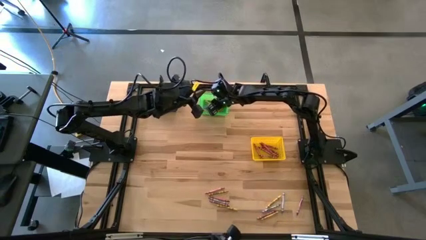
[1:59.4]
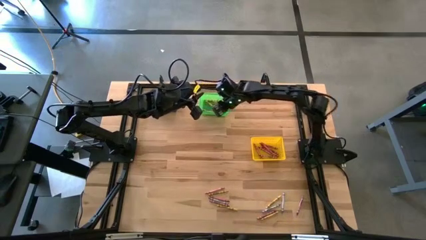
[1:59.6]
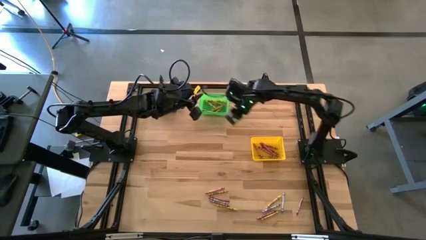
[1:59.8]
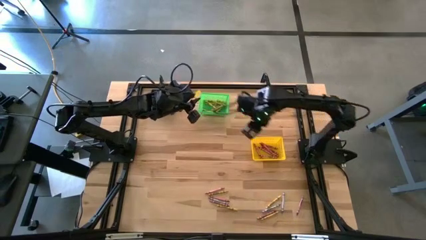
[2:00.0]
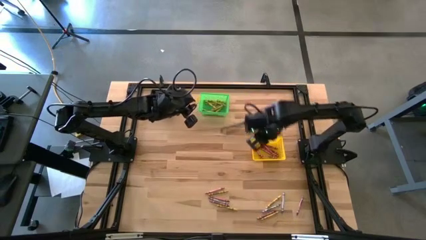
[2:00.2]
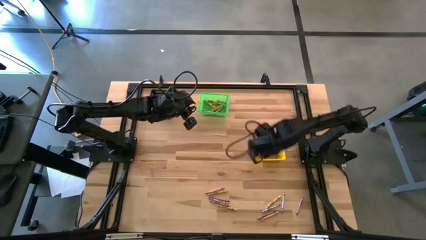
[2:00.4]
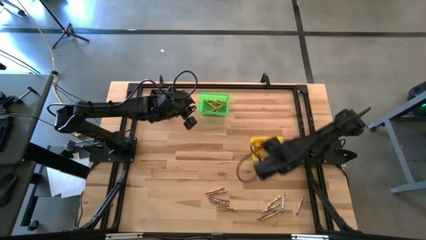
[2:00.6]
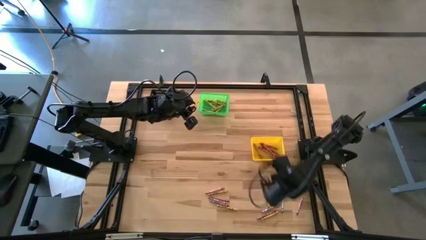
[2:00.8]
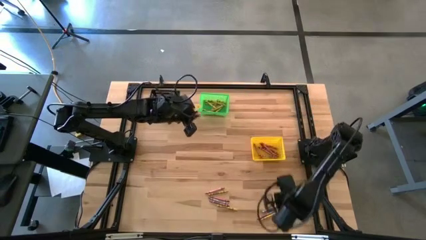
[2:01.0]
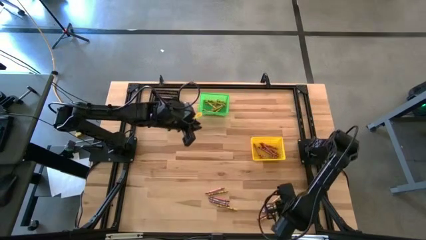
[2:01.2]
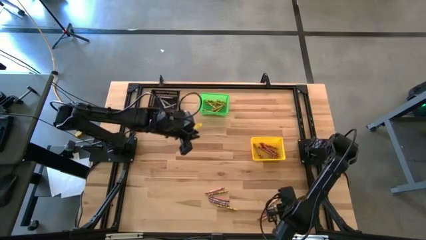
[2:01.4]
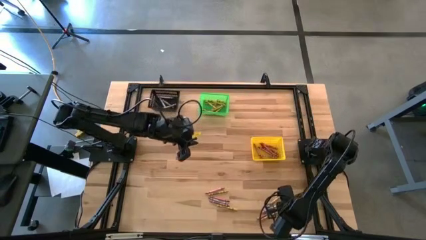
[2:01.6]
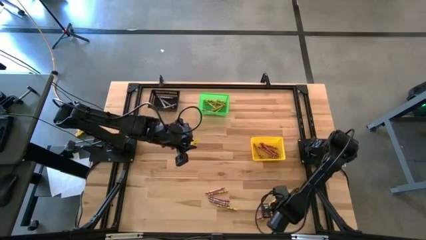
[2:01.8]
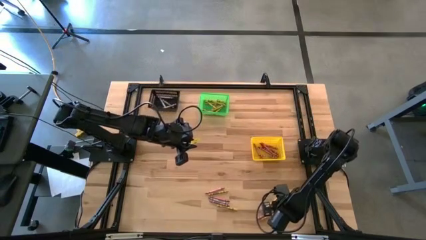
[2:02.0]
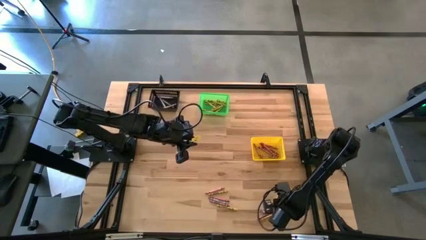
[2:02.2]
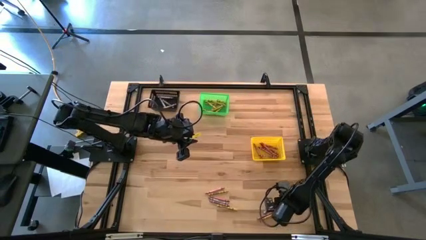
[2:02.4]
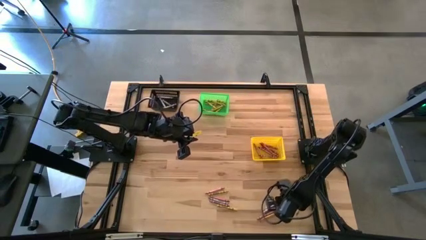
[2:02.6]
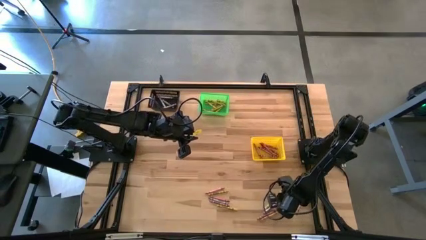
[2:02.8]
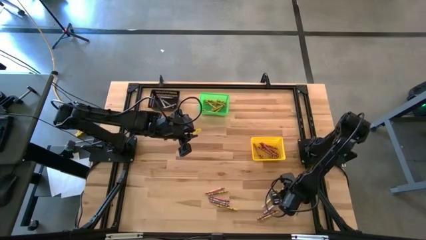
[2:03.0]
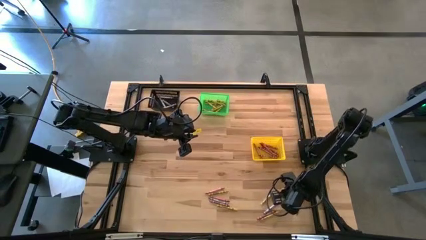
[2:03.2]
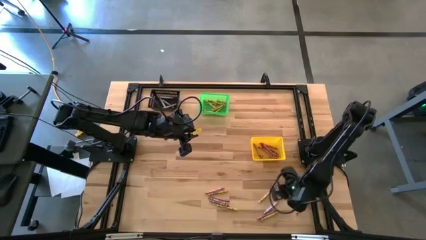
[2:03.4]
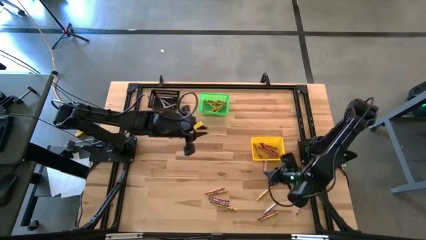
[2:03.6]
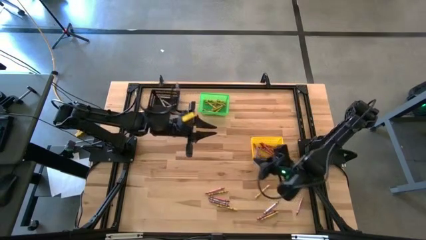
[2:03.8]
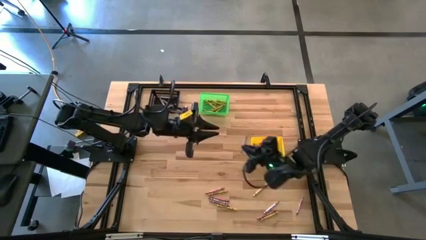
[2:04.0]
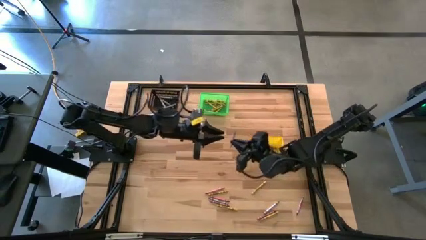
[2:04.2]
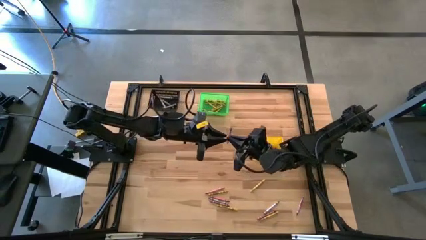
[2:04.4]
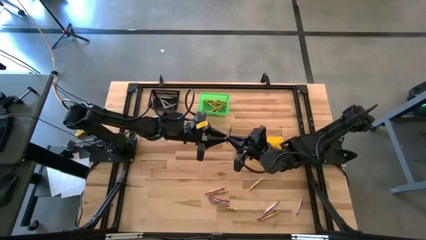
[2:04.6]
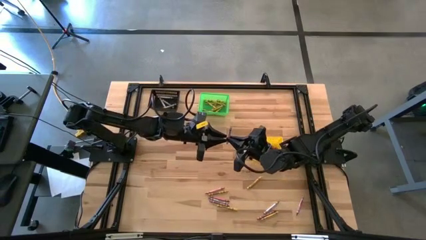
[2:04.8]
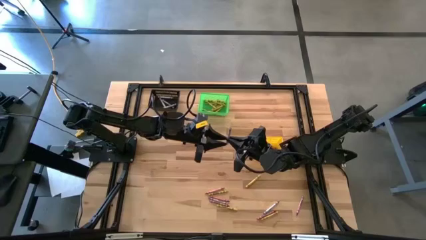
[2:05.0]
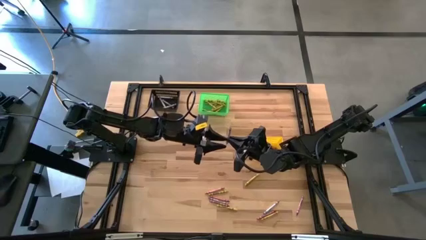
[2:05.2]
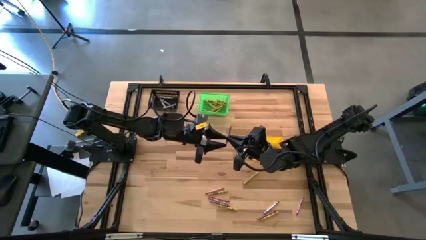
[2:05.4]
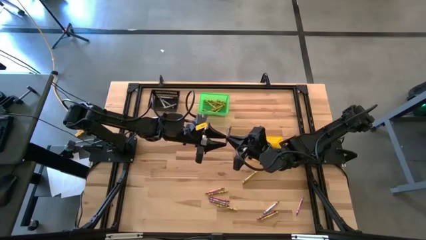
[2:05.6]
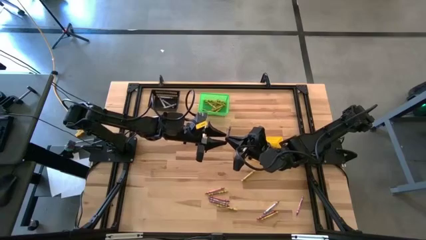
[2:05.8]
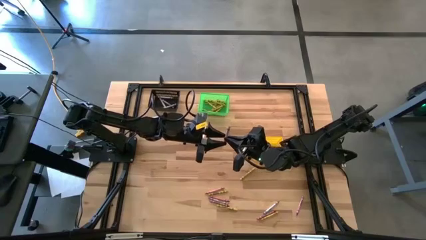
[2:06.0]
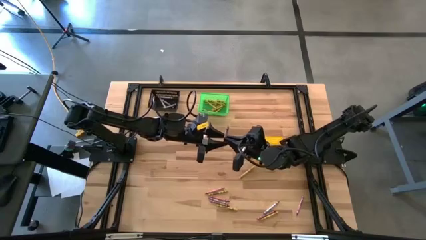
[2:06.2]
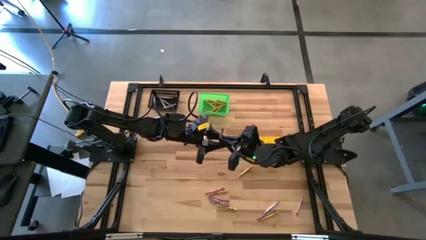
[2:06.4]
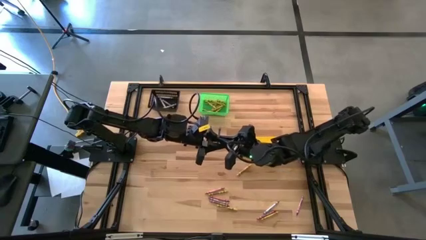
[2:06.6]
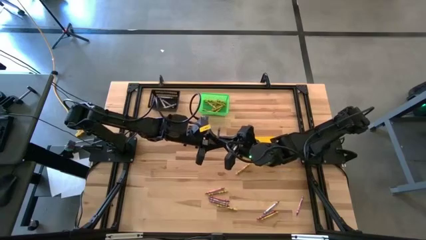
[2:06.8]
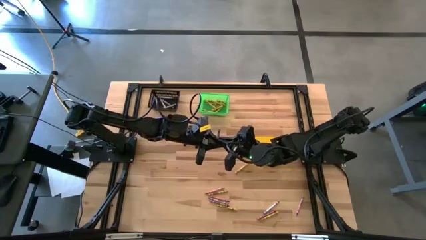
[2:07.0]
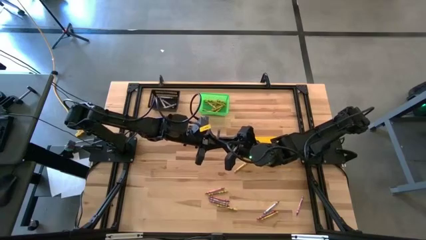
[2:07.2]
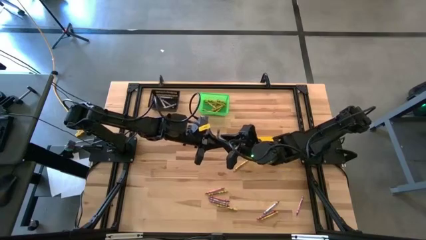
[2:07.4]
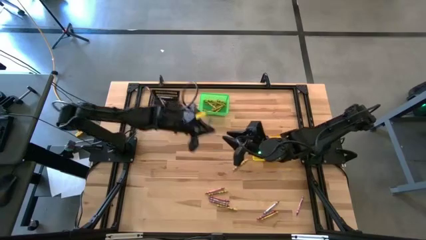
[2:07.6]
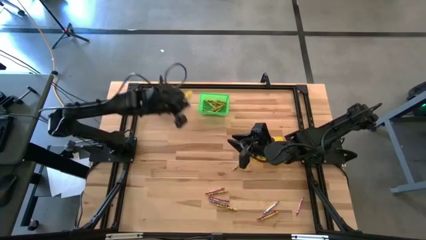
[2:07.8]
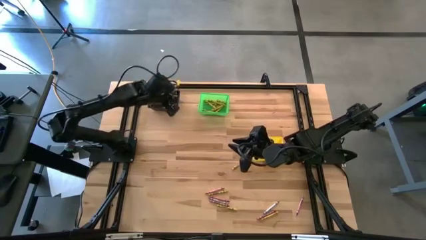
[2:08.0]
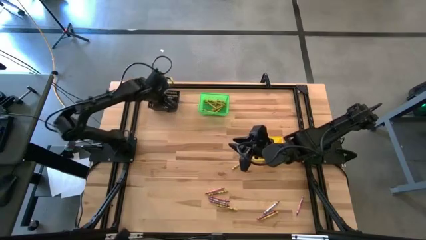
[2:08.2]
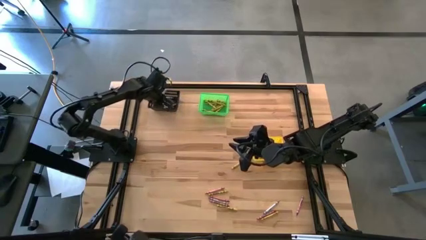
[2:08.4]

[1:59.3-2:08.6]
Task: Sort crayons
Put the gray crayon into the black basket

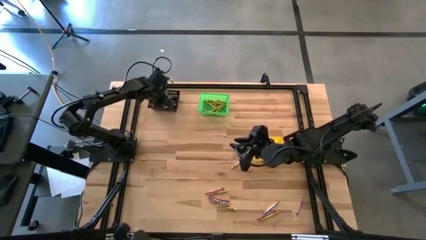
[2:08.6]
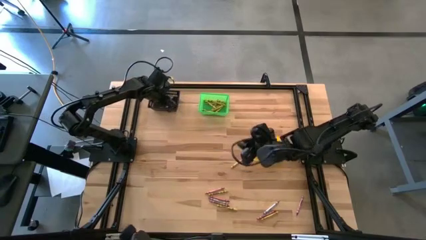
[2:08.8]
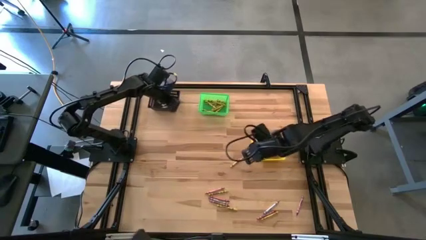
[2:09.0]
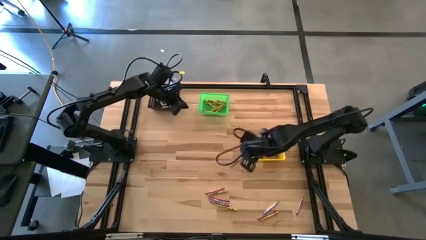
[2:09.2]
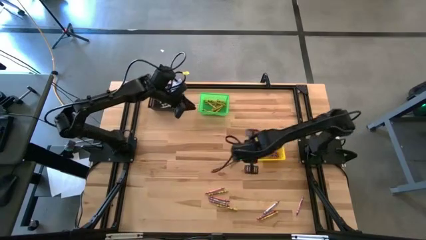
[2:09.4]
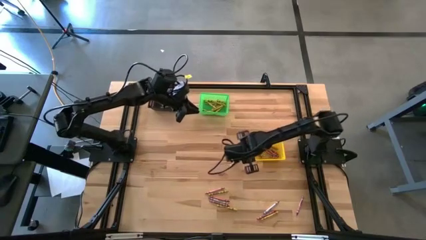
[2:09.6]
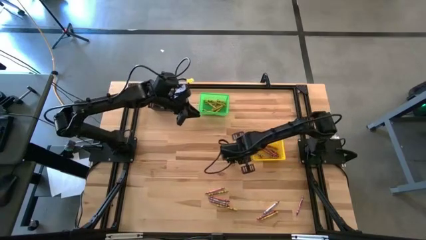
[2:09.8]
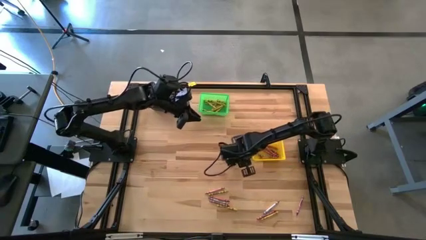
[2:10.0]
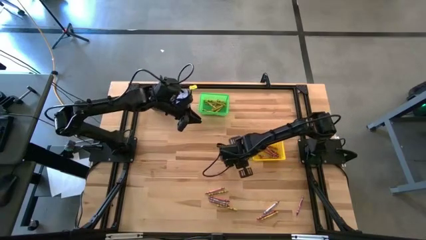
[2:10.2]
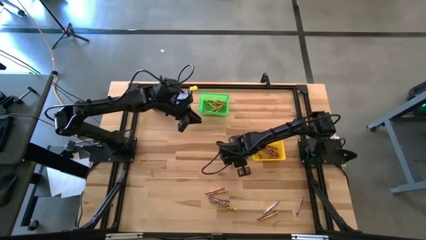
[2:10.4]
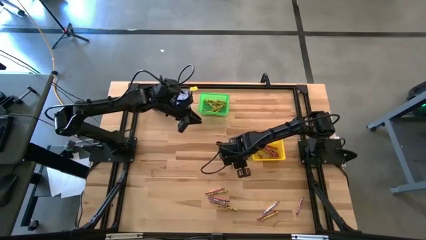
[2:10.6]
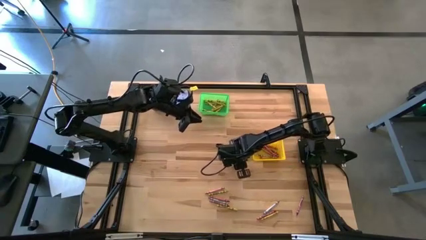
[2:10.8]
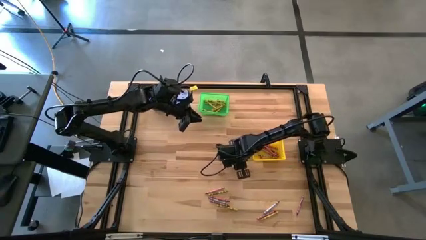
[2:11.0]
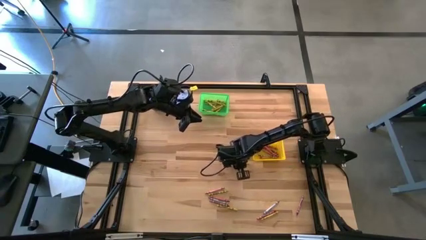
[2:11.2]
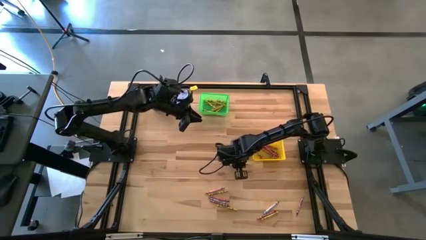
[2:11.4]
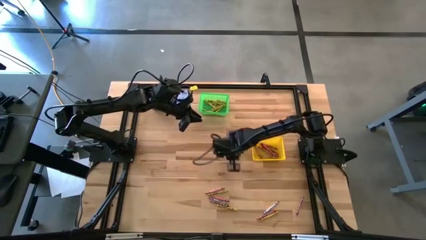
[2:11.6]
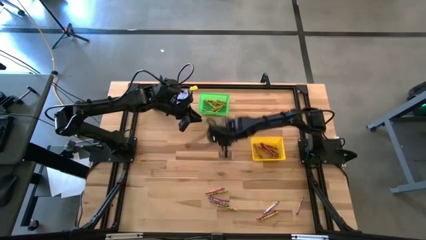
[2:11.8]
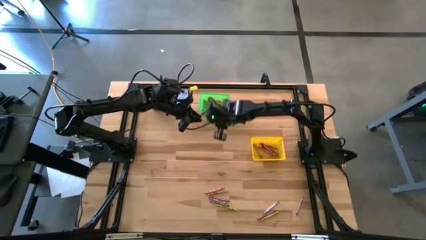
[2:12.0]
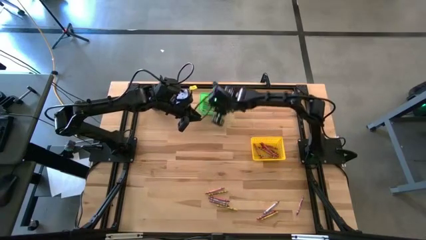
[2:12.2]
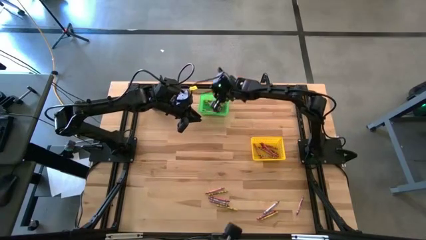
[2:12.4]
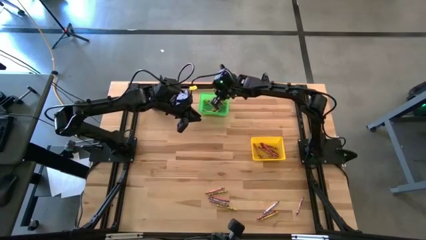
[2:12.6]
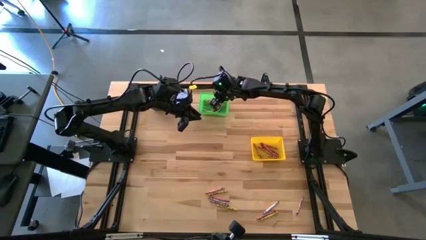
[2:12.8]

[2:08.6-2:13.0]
Put the yellow crayon into the green basket

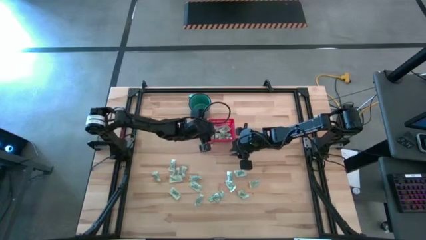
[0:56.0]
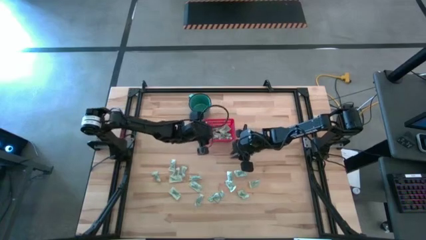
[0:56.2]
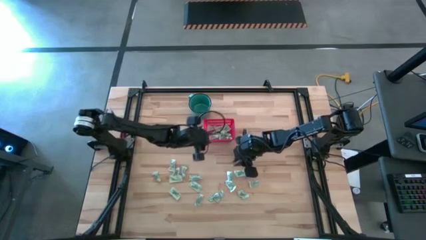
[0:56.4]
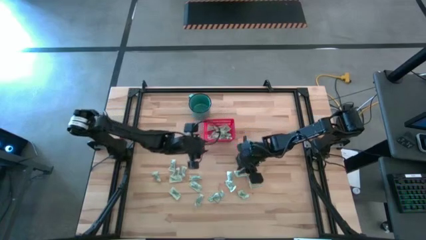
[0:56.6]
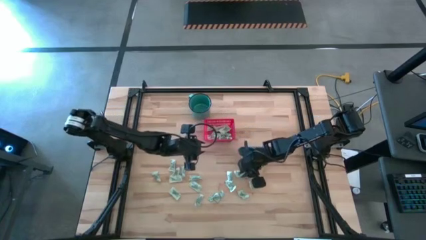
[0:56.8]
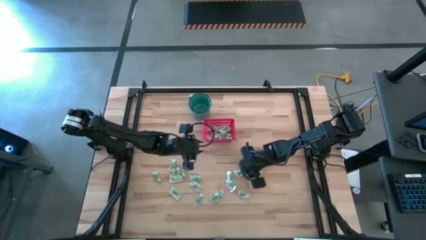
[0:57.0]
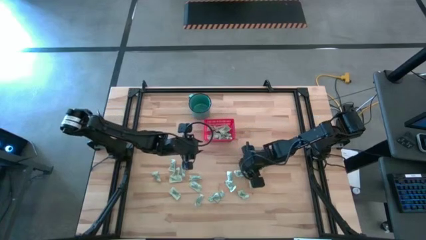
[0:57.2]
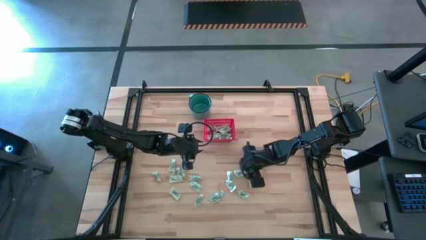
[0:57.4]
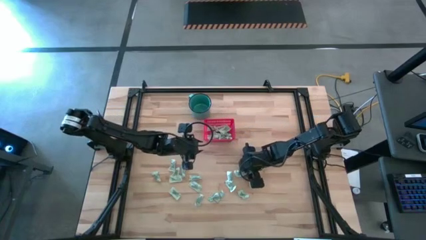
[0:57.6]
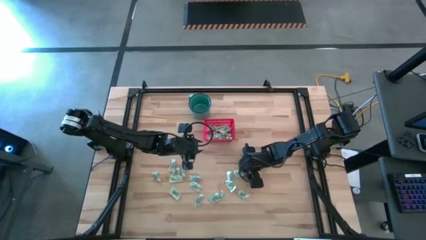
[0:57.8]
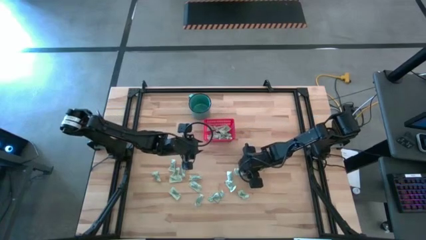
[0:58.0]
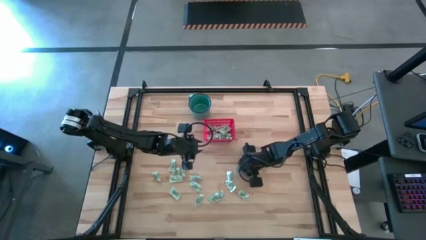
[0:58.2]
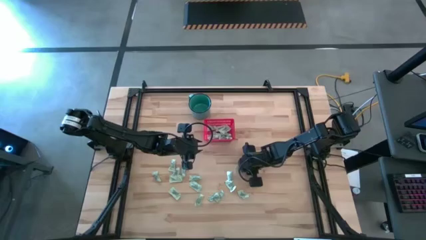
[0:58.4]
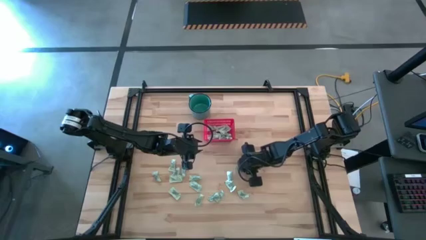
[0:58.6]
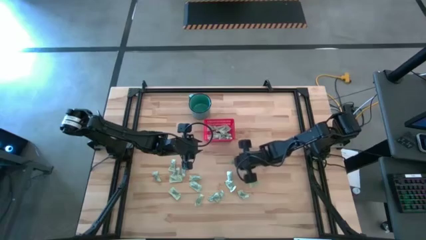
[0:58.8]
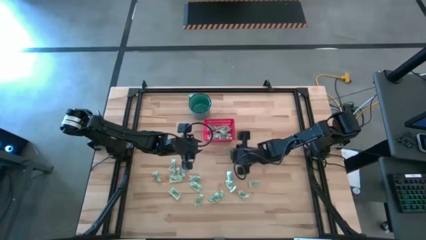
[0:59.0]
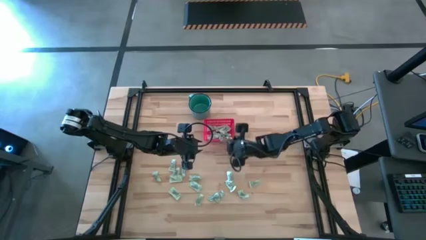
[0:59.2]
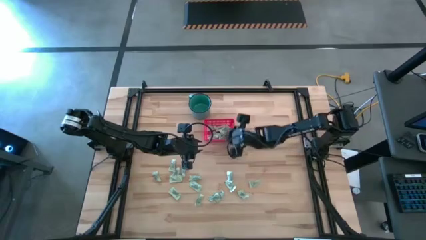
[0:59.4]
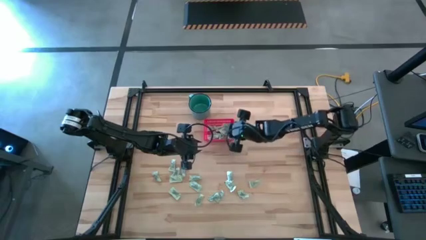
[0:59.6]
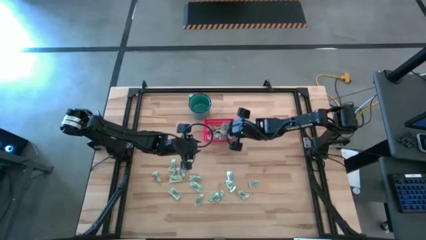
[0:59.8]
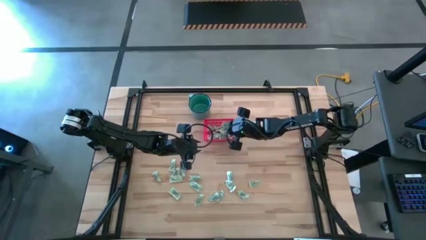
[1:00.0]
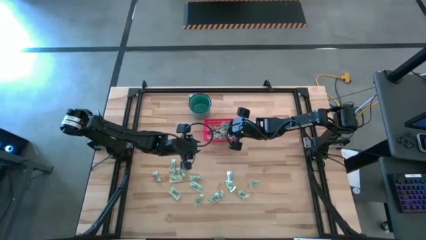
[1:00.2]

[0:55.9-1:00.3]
Task: Pick and place items into bin
Put the light green stevia packet into the red bin
